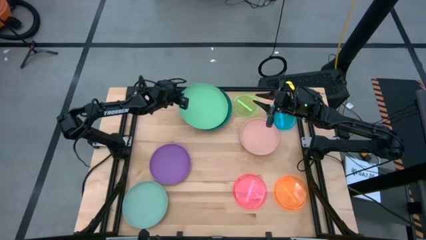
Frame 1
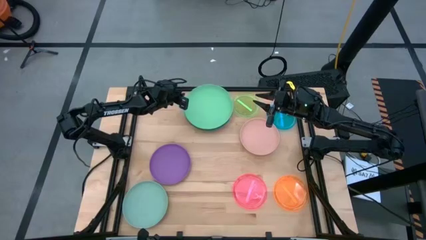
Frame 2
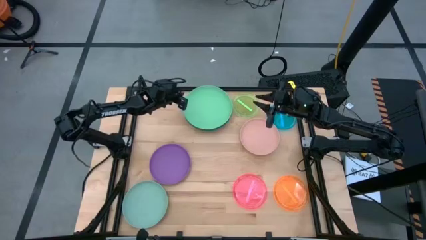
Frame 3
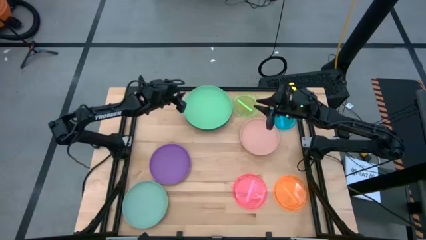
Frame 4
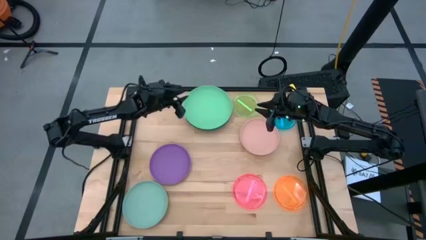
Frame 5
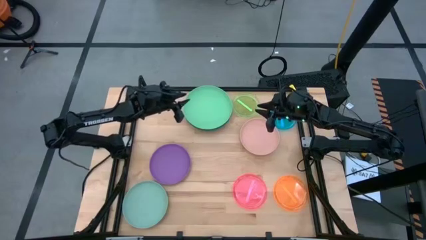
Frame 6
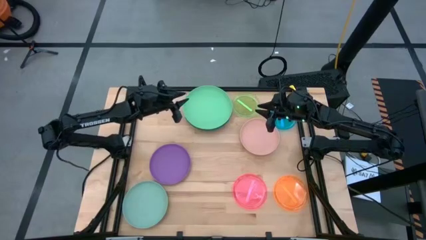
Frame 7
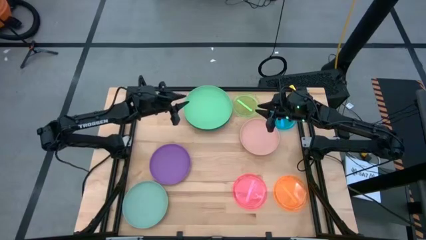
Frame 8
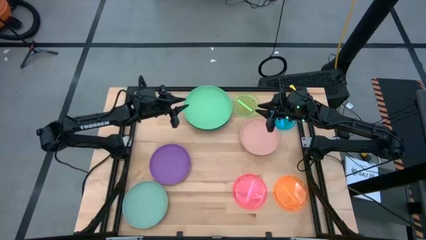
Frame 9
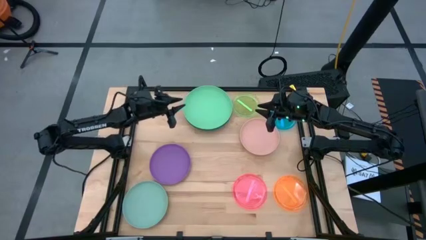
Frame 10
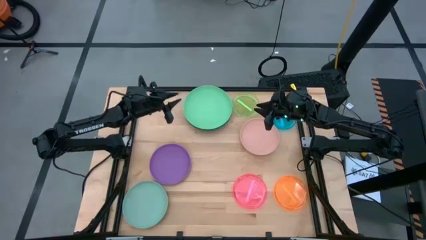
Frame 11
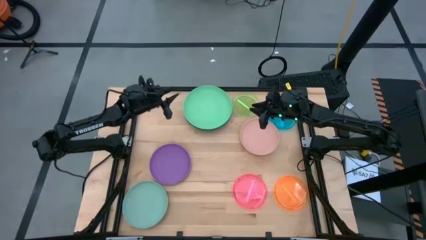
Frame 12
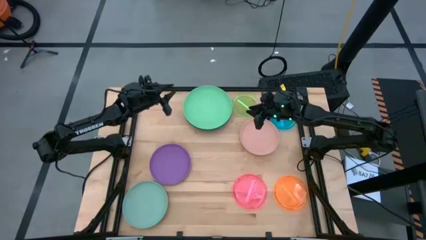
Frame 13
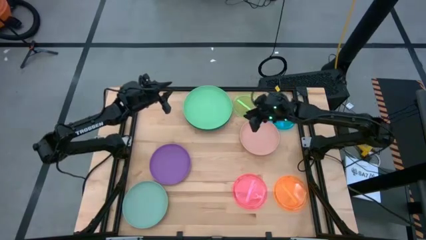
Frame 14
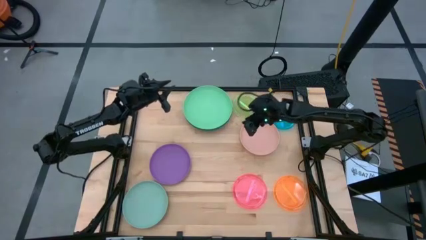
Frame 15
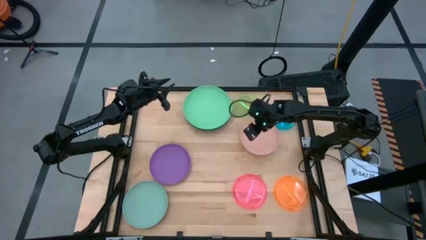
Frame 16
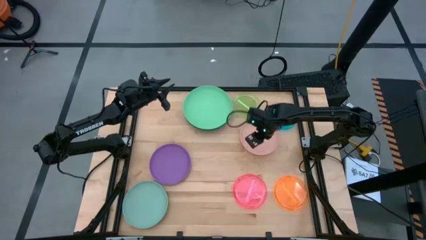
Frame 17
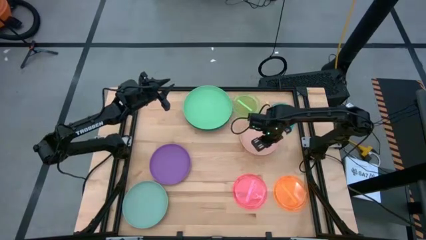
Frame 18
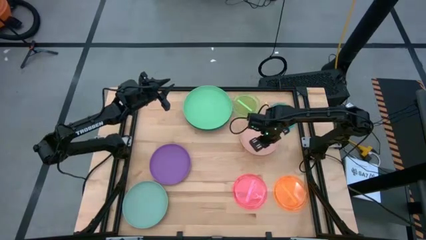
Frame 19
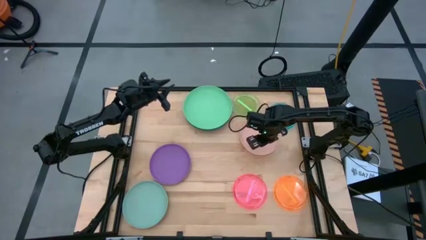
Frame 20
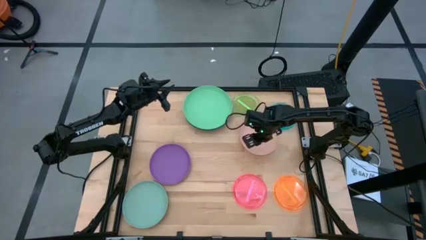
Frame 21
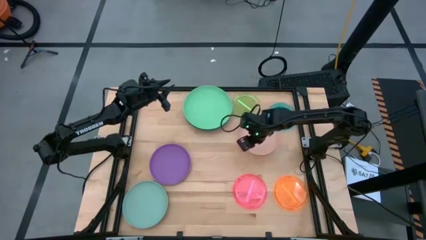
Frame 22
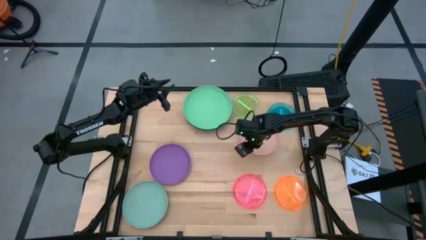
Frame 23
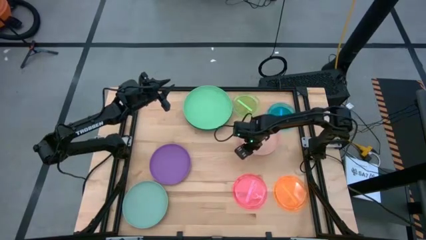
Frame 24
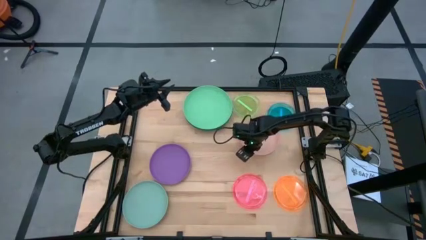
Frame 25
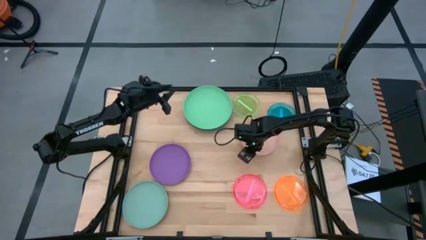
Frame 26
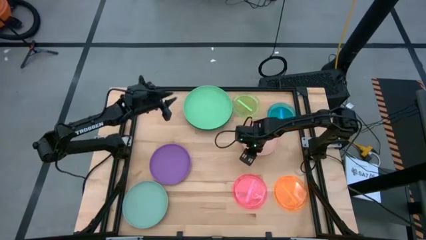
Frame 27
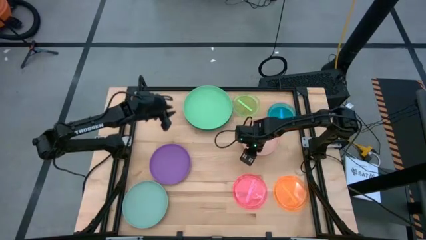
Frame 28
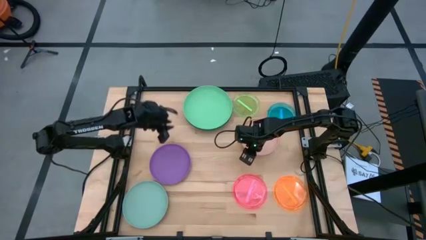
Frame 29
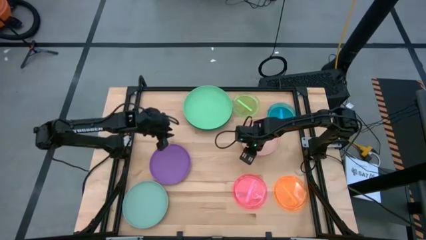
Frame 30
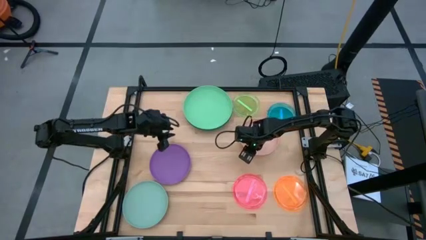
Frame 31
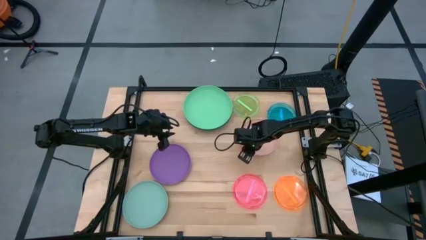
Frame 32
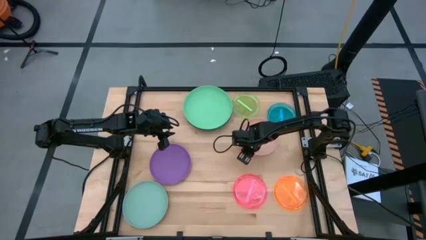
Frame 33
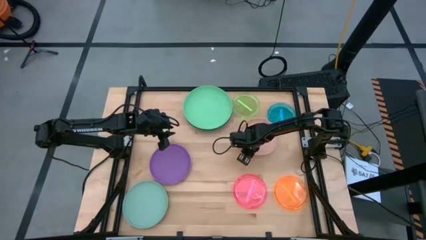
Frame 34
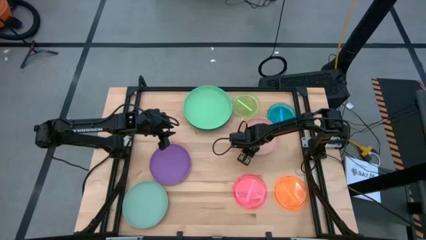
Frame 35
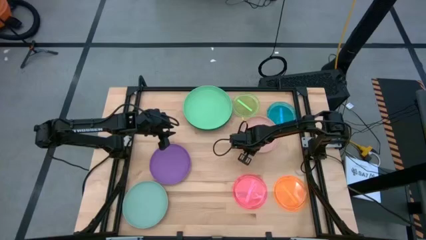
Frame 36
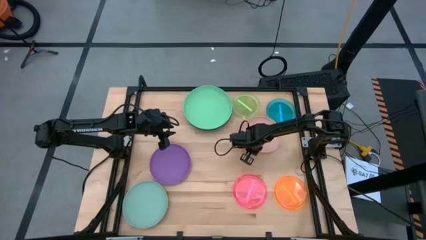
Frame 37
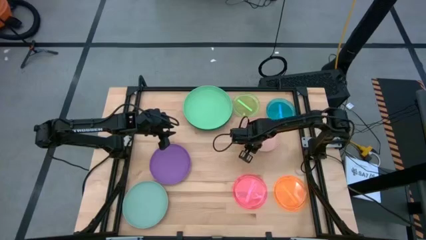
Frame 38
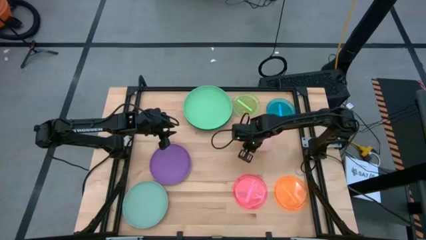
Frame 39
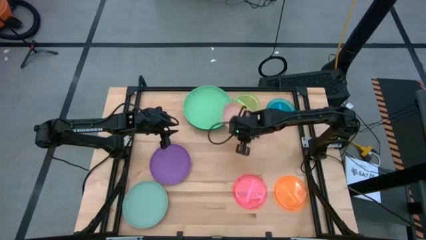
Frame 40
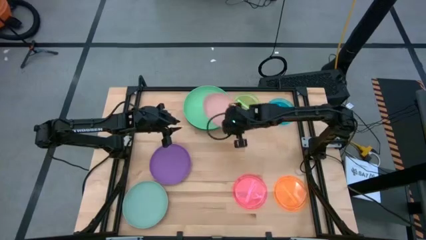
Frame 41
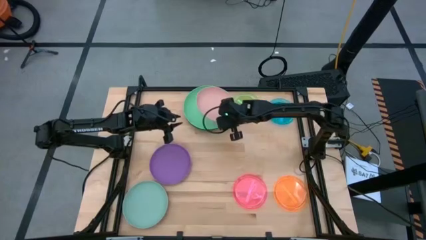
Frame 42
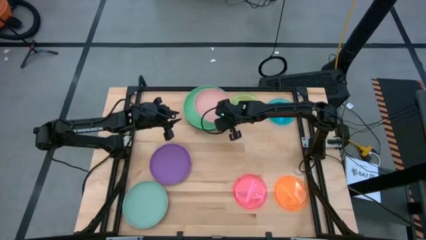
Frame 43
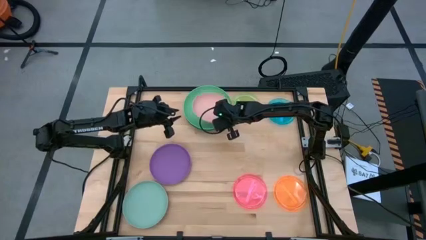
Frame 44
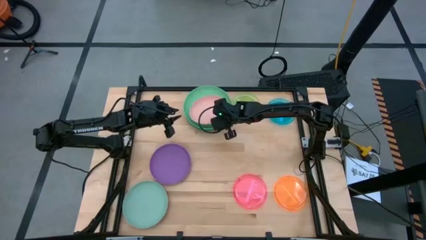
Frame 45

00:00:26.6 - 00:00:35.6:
Task: Stack plastic plates
Stack the light pink plate on top of the green plate

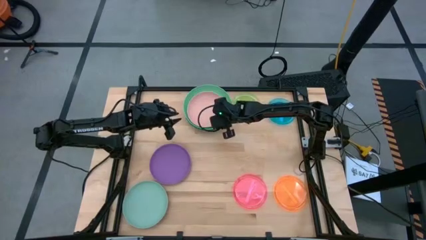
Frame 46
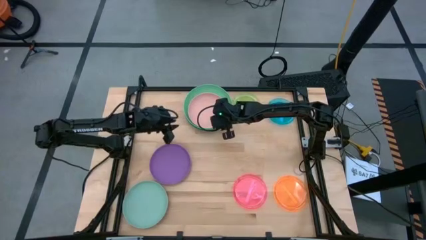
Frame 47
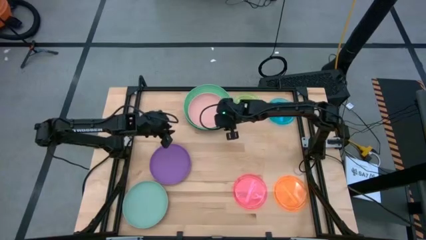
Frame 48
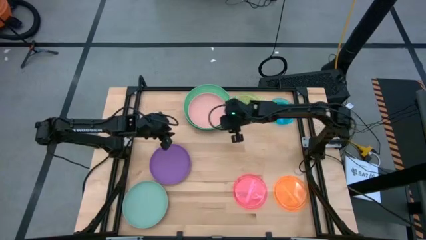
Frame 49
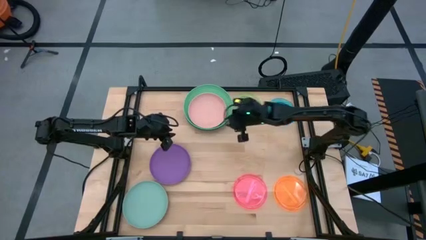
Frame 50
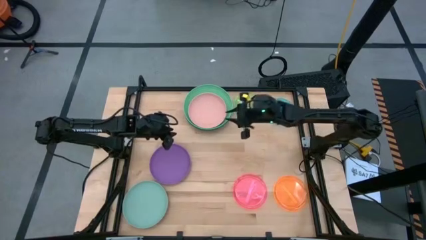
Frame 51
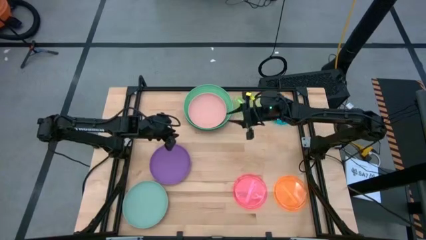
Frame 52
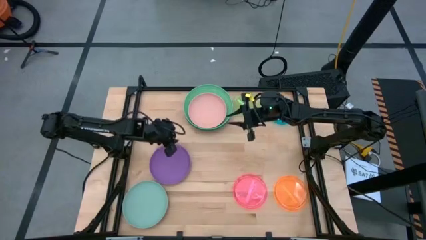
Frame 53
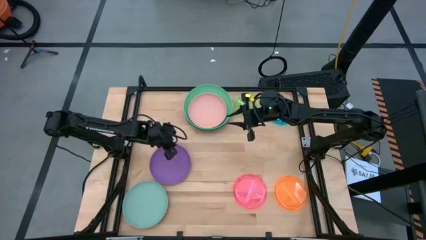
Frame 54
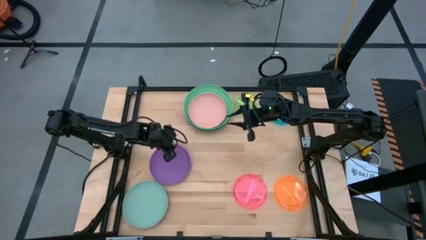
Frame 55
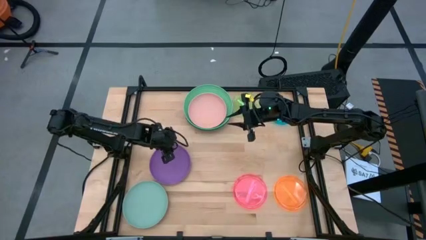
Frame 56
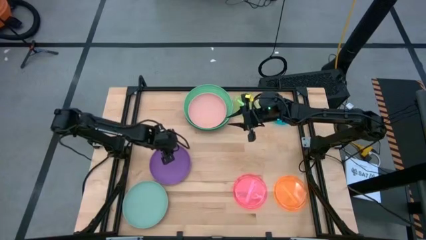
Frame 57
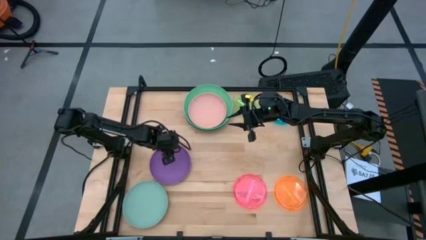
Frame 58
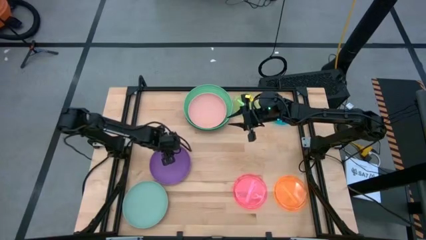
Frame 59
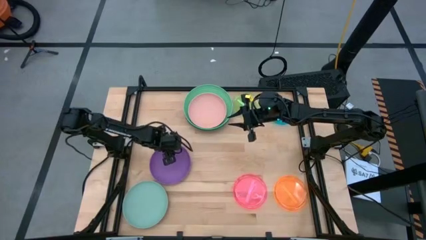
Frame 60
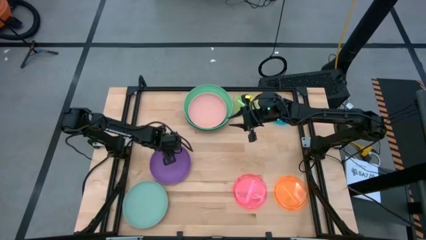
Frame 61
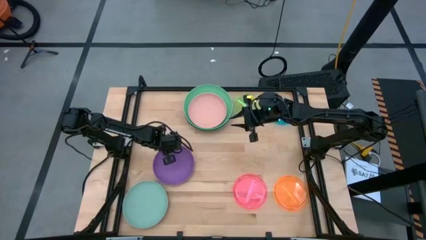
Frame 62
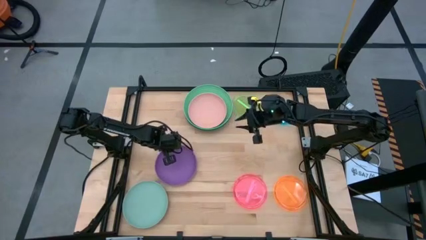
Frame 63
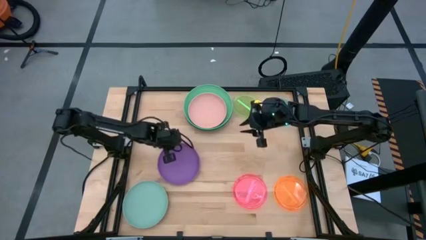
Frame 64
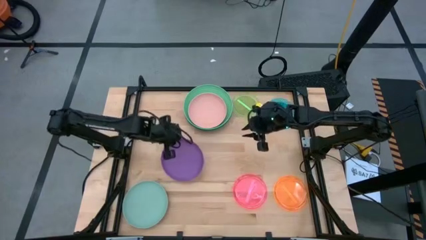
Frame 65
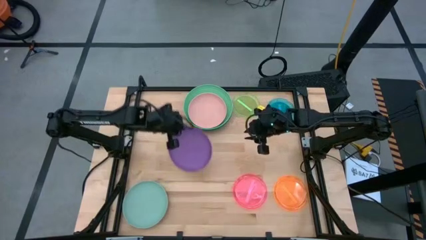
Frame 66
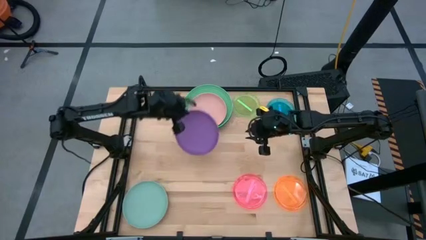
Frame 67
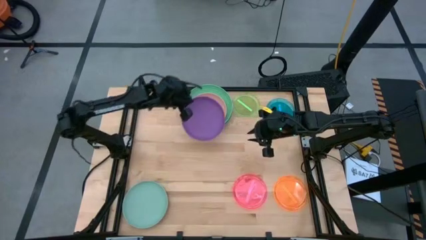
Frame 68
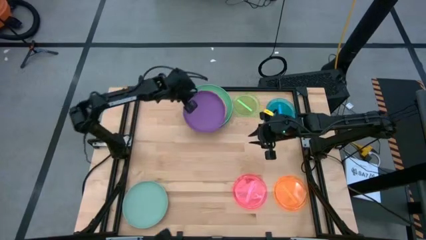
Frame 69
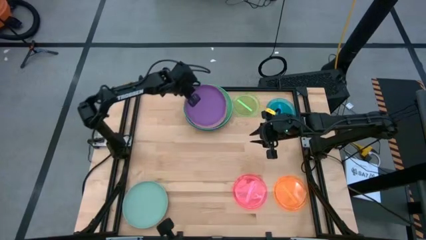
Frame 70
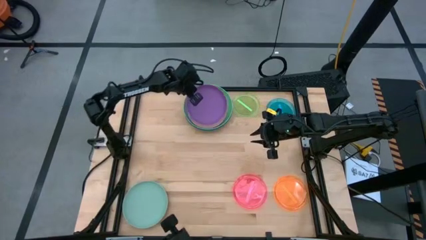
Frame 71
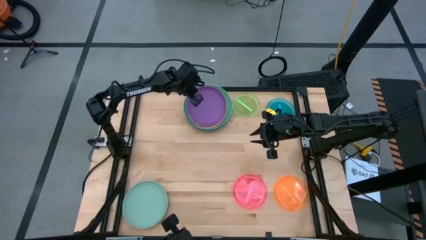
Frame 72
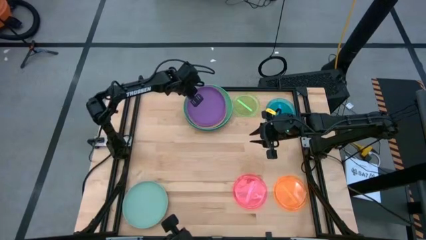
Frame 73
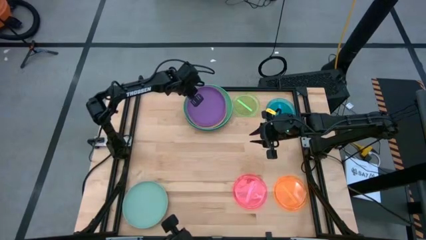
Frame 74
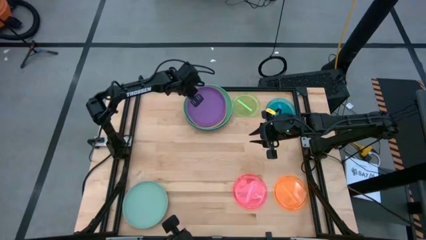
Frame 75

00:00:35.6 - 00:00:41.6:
Stack the purple plate on top of the light pink plate
